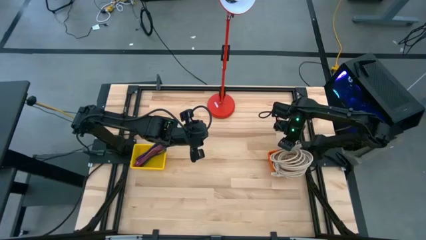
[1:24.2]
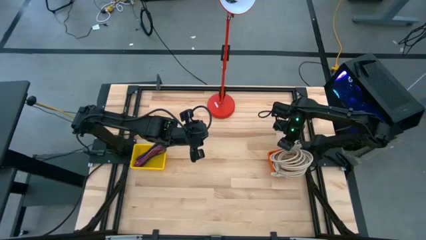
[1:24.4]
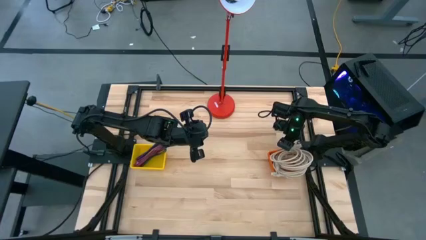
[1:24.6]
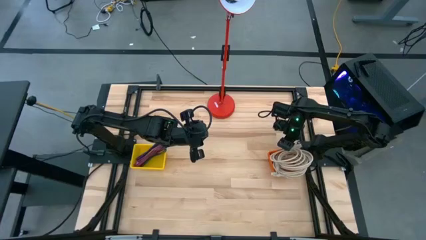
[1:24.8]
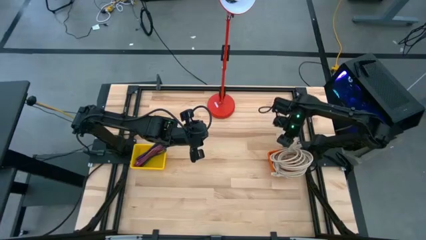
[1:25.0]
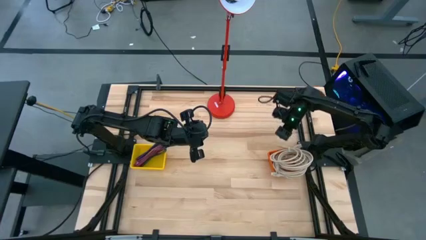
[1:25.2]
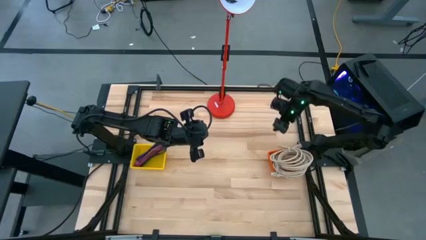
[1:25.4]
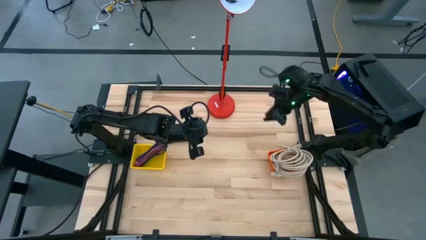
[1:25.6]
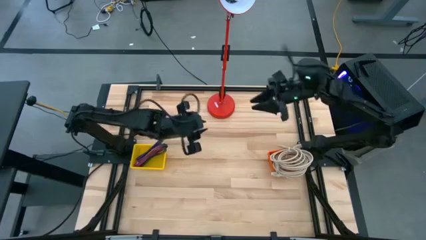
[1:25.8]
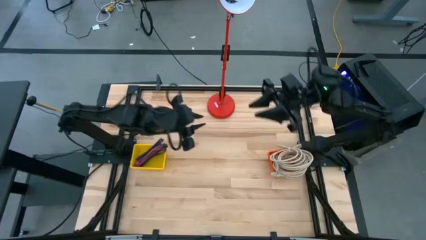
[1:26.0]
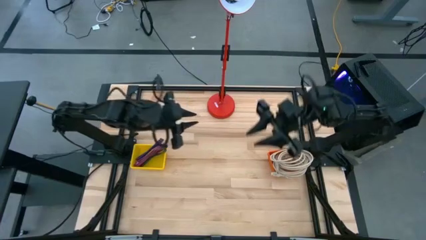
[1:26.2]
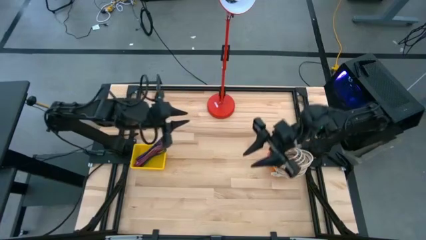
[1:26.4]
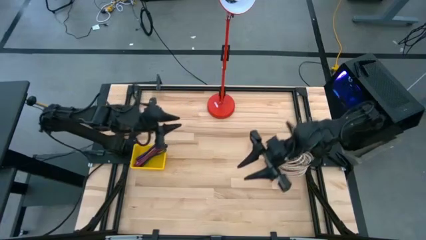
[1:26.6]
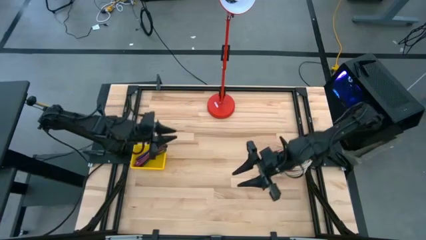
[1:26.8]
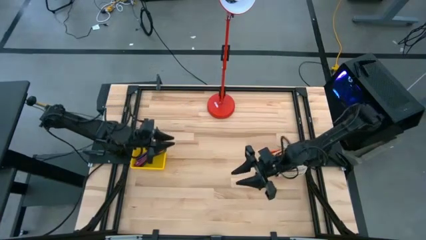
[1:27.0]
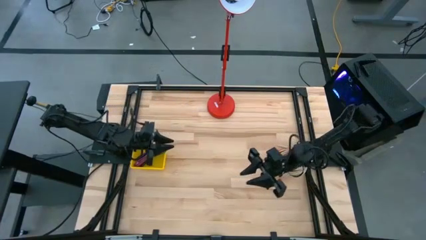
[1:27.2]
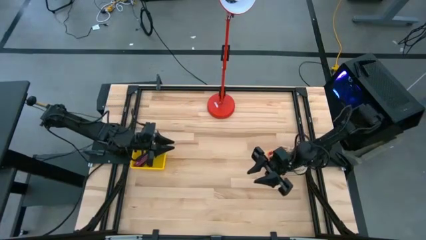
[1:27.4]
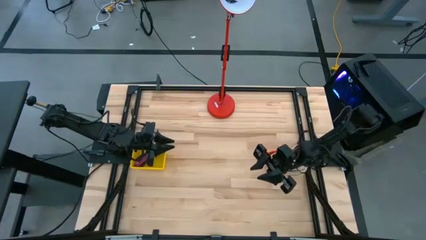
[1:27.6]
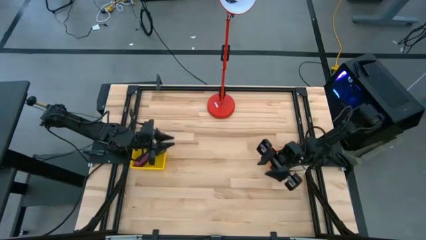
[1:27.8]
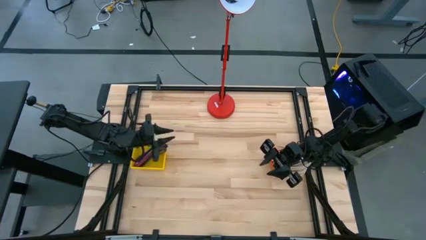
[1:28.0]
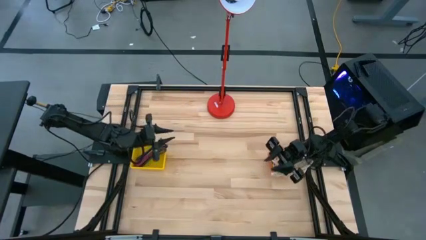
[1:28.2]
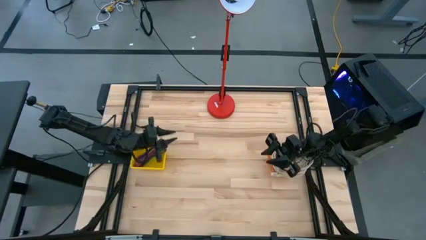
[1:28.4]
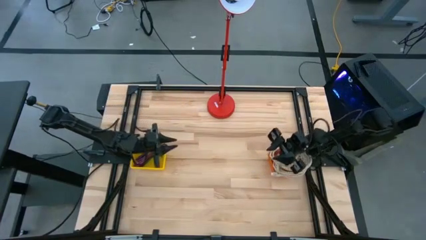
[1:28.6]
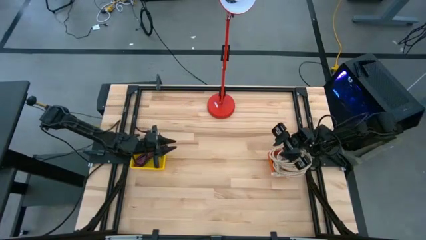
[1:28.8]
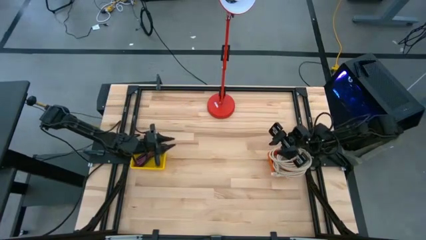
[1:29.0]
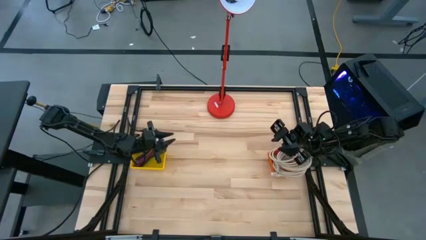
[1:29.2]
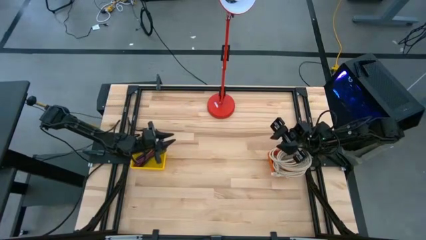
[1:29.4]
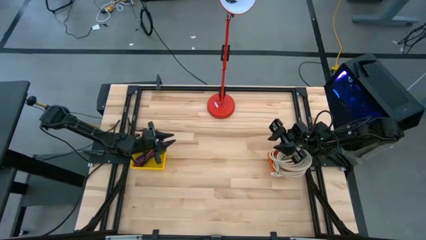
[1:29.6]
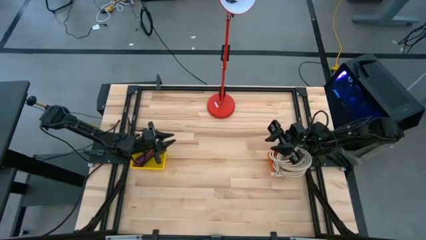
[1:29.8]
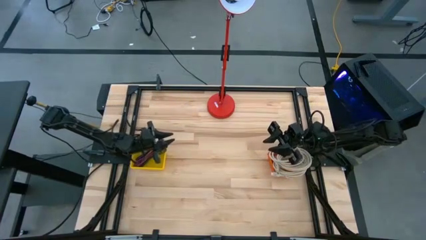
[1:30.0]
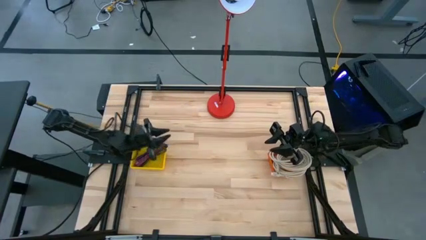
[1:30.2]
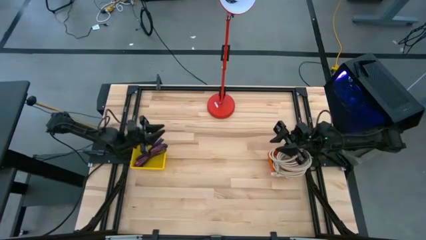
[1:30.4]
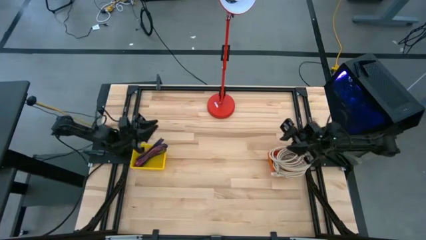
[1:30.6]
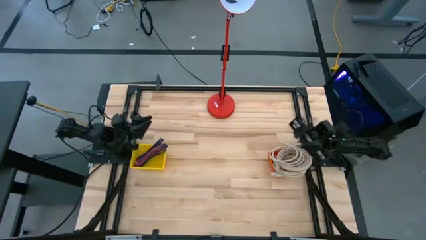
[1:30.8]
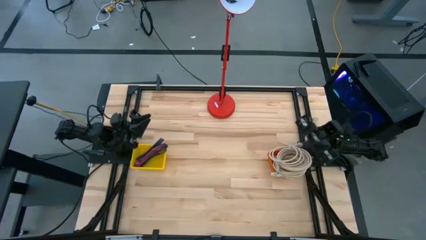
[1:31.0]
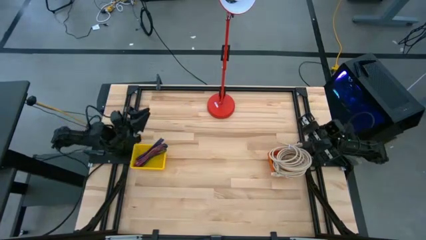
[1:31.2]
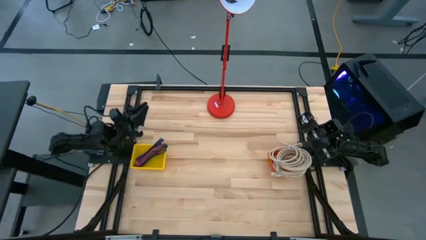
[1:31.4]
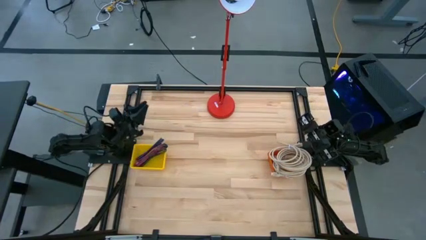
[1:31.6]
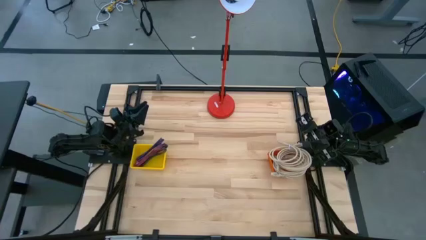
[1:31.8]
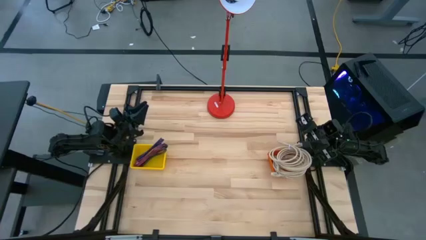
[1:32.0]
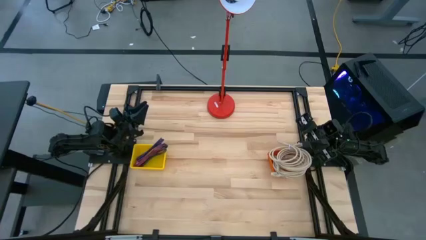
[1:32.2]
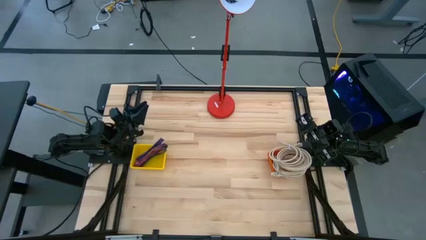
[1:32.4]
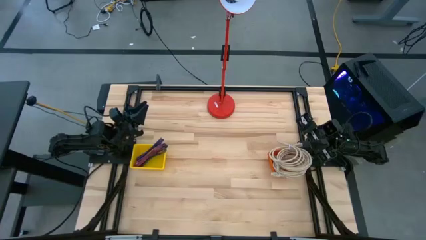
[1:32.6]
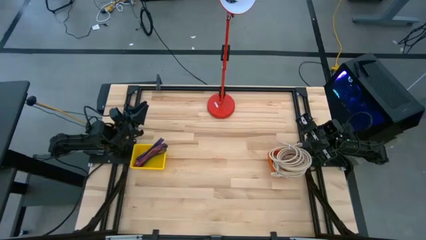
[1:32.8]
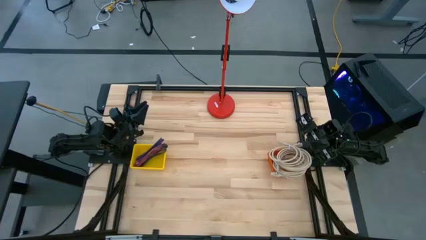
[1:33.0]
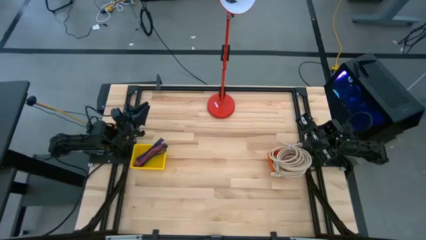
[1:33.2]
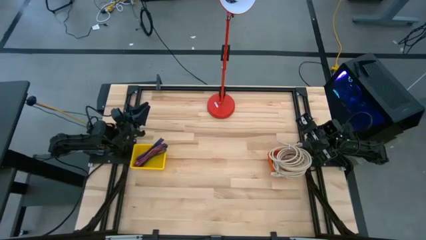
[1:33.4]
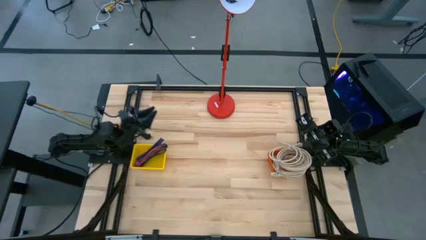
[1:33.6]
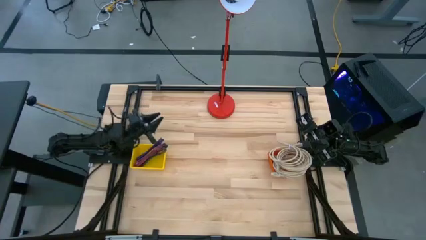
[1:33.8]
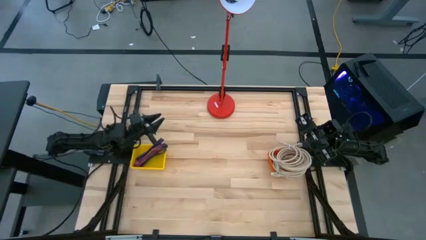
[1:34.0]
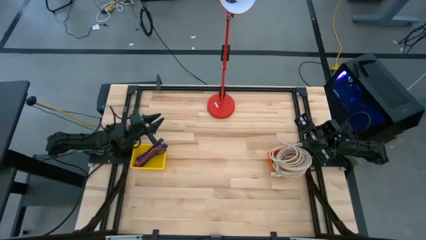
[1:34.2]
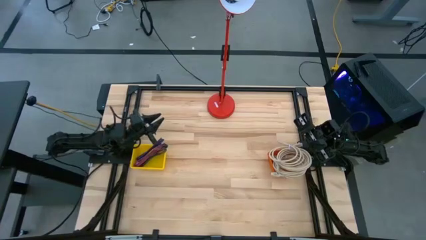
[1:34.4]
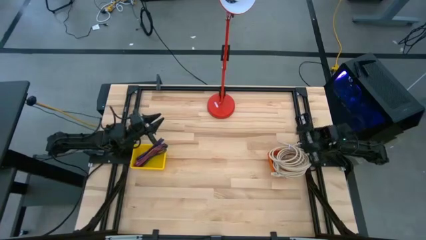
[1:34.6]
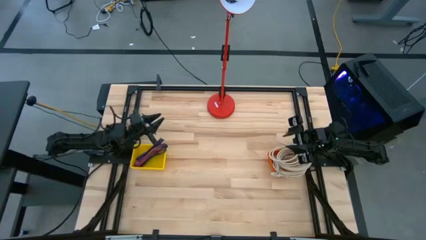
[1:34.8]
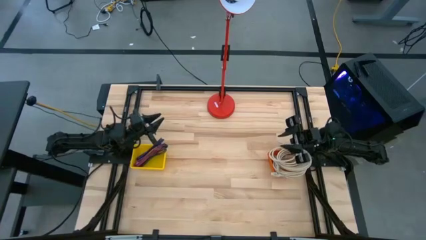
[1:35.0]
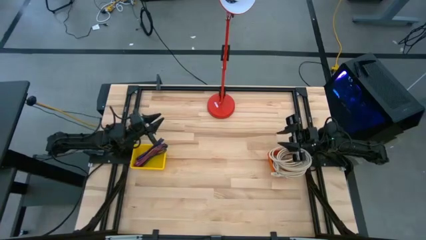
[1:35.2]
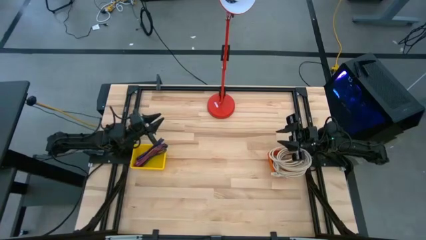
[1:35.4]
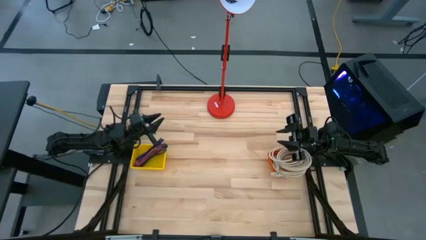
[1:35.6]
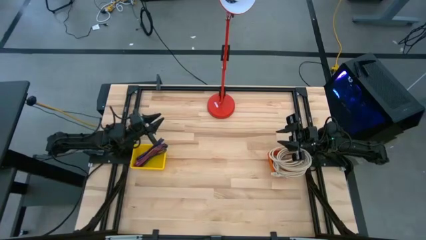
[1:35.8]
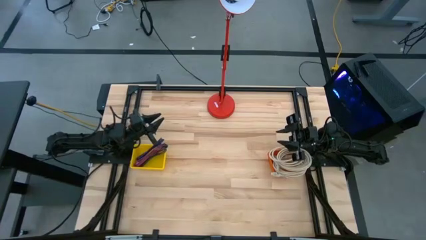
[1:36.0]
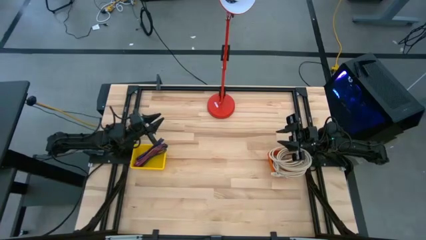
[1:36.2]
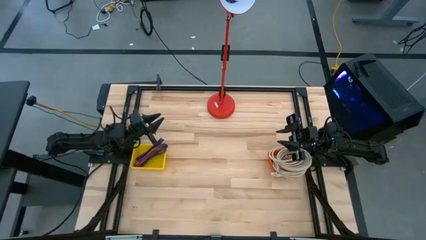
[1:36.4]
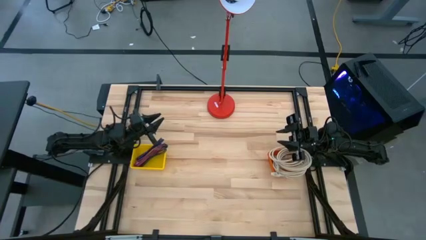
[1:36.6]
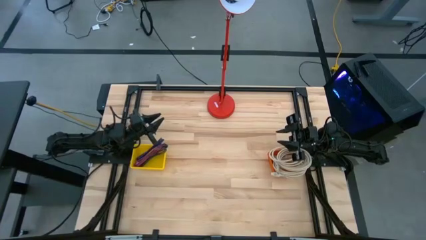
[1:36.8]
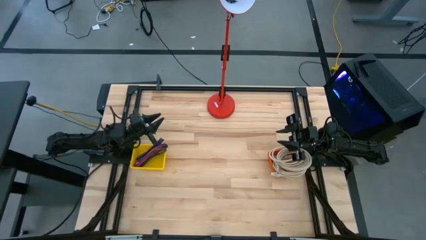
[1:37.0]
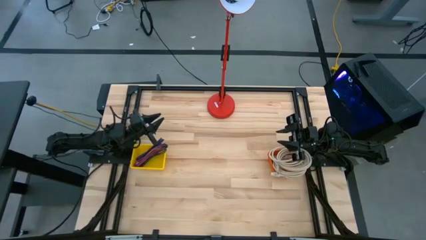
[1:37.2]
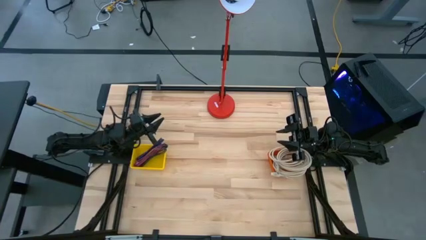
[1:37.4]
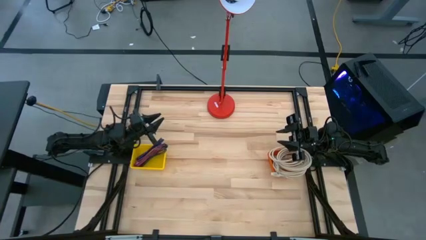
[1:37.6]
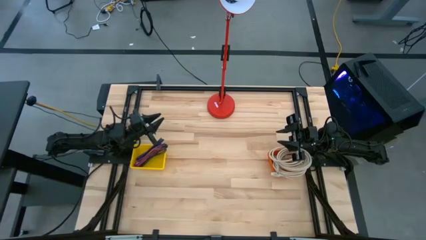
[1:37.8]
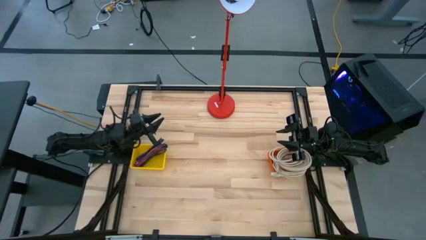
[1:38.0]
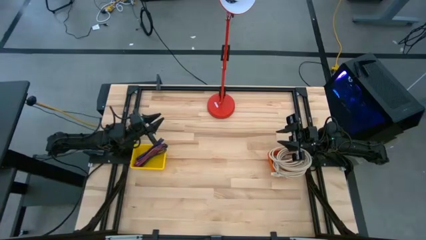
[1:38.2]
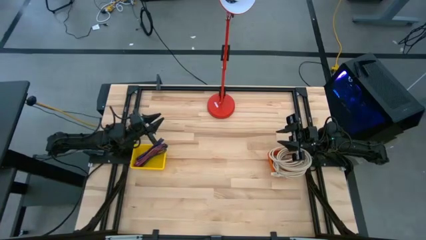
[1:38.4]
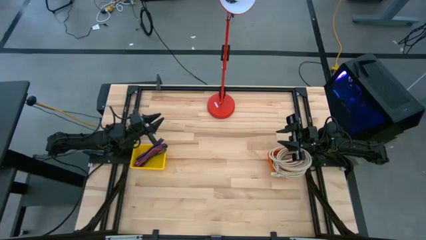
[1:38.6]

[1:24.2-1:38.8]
Task: Pick & Place USB Port
Return to Home Position
